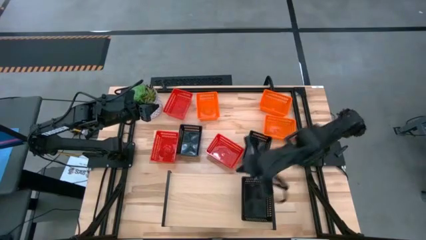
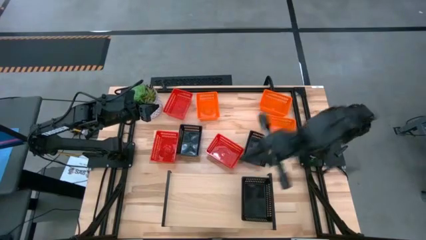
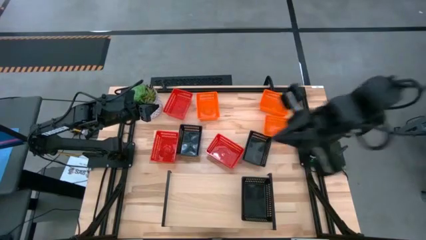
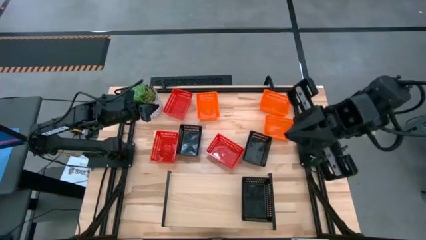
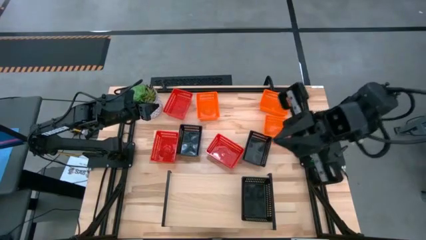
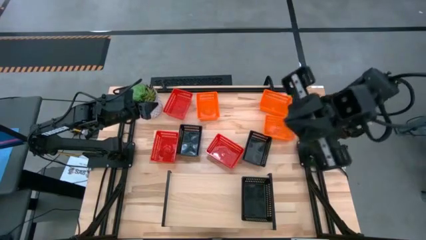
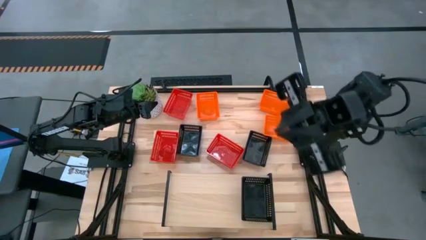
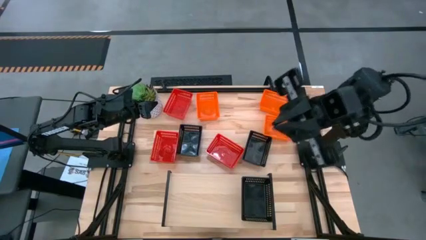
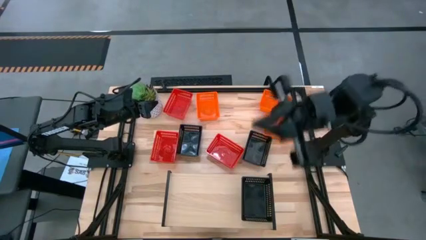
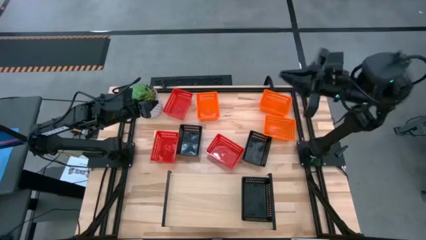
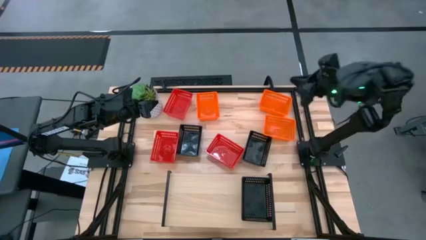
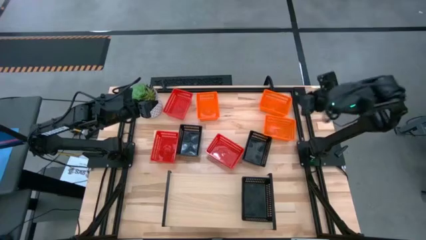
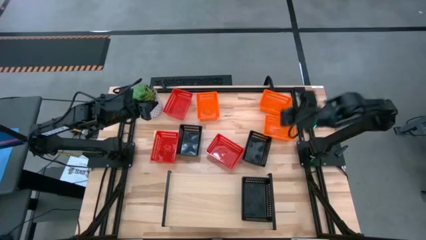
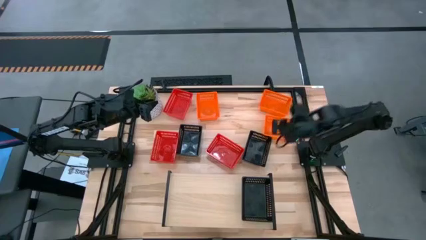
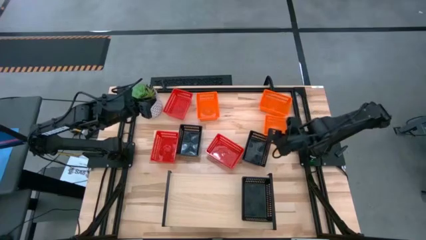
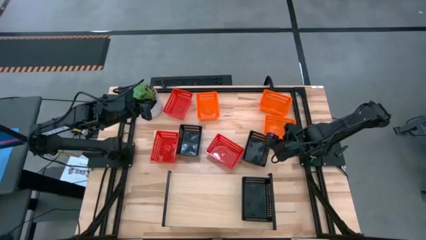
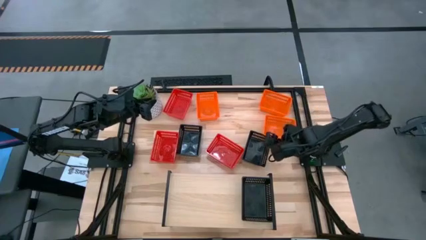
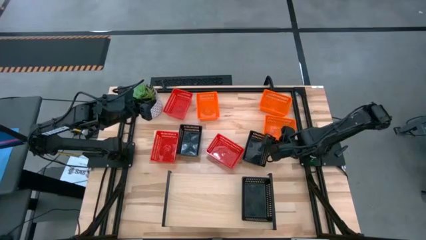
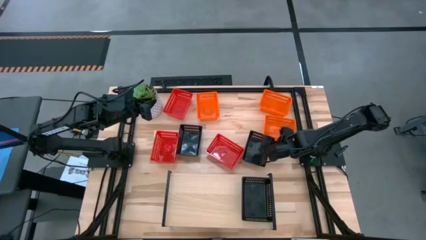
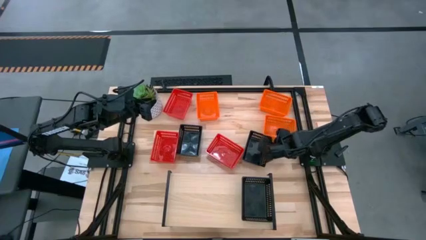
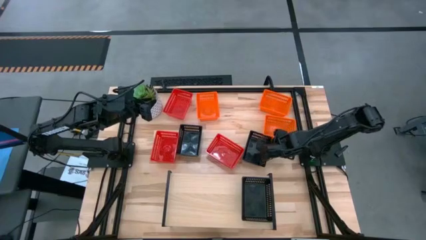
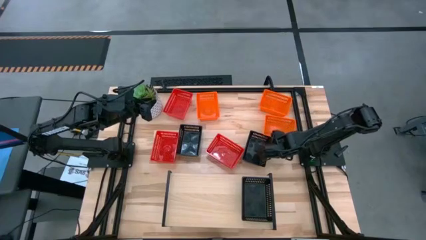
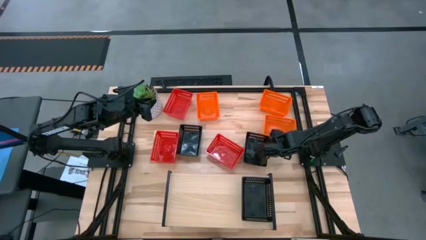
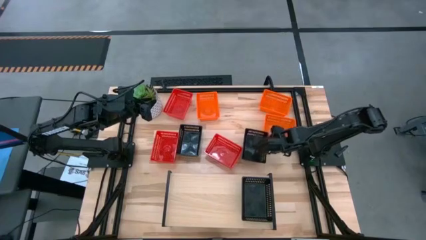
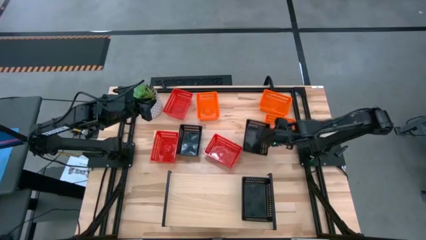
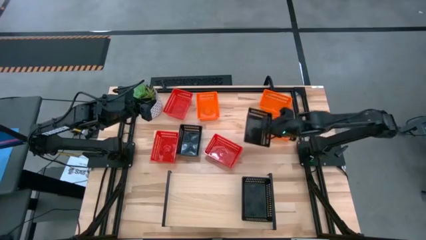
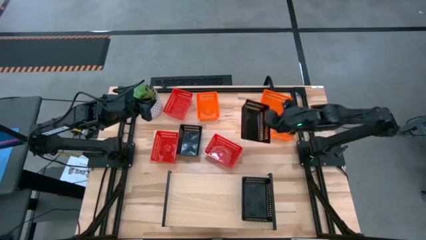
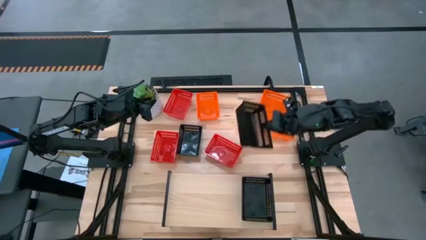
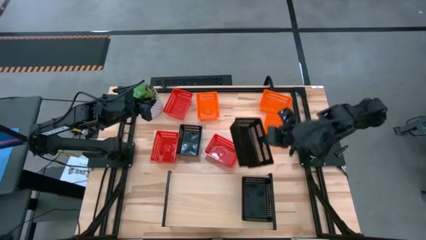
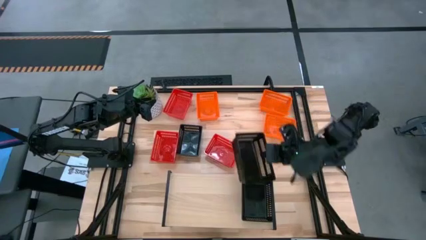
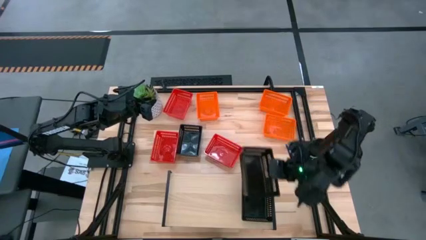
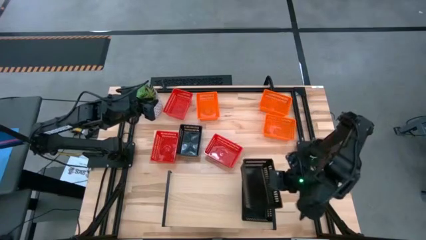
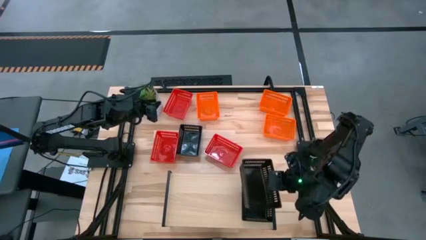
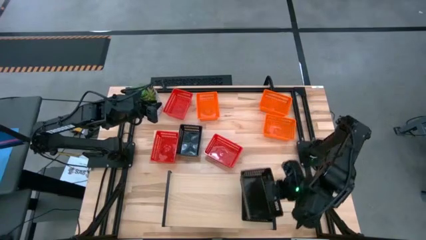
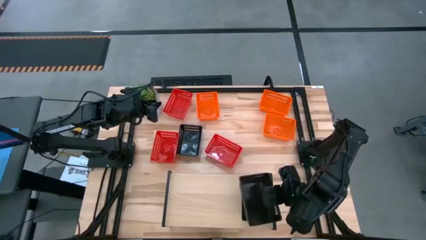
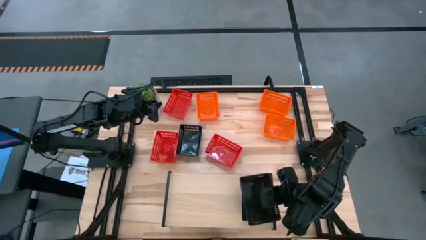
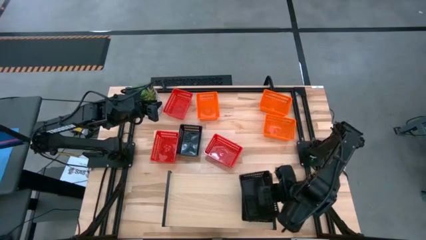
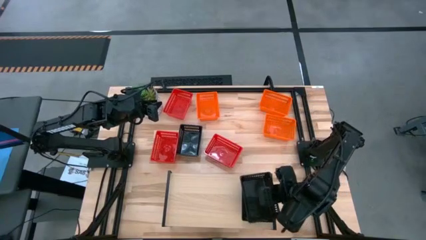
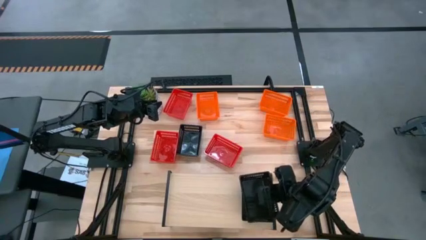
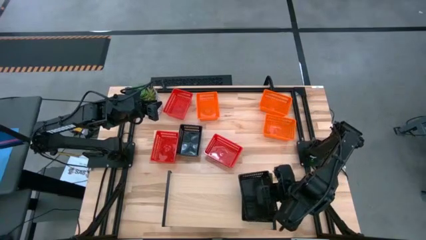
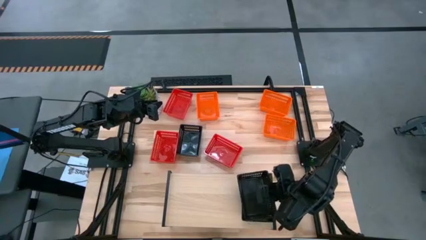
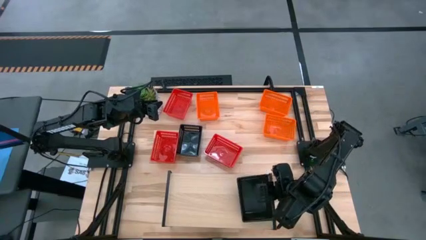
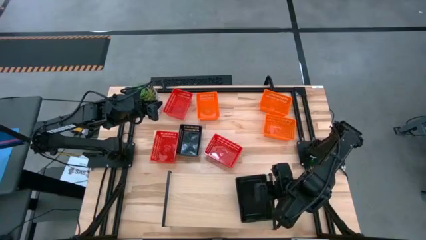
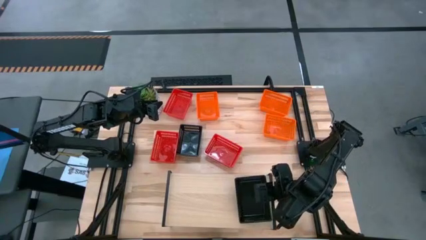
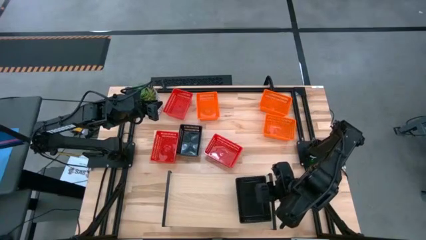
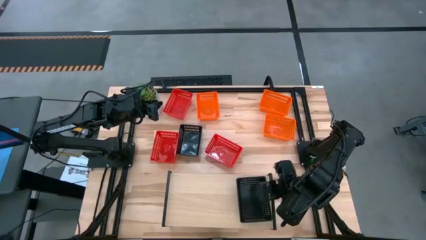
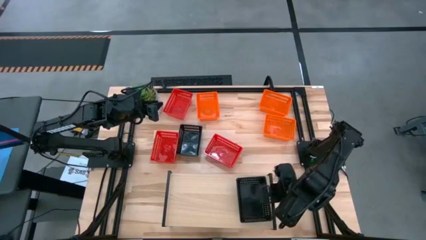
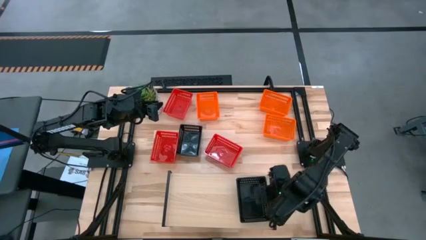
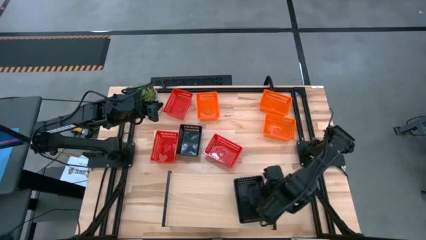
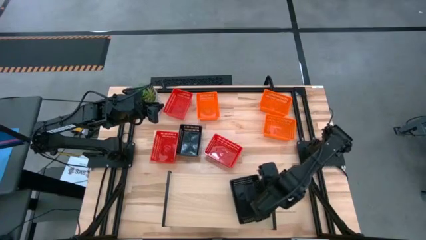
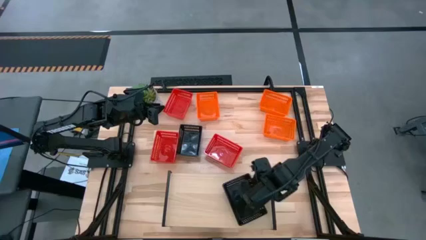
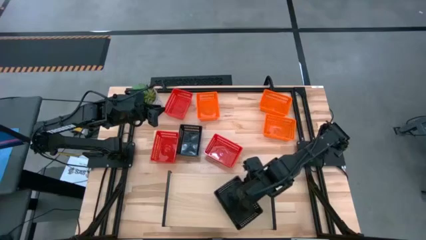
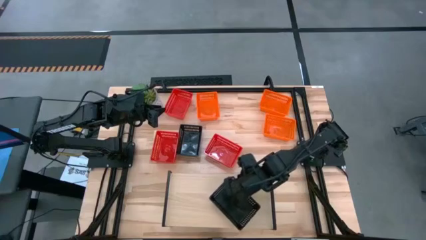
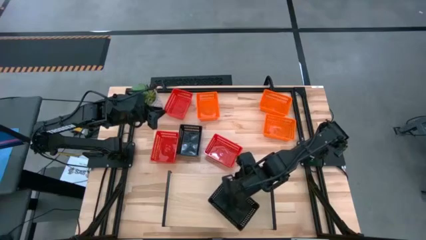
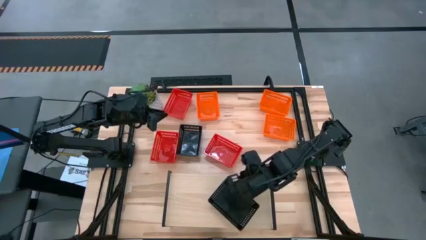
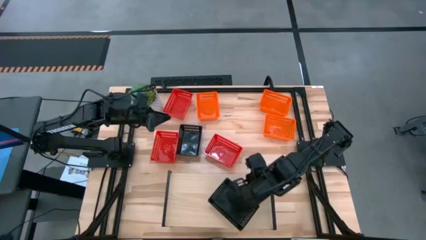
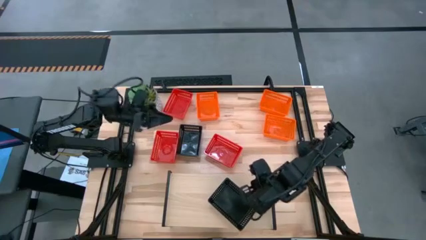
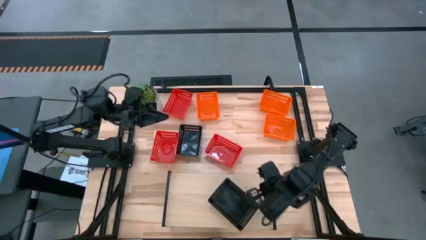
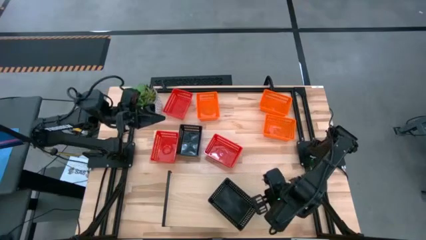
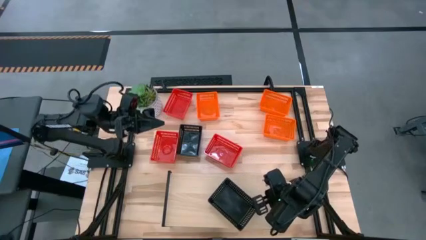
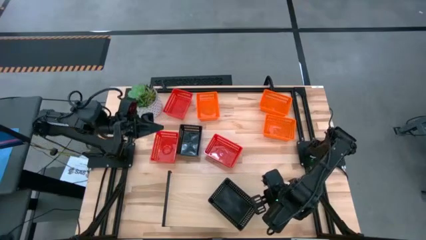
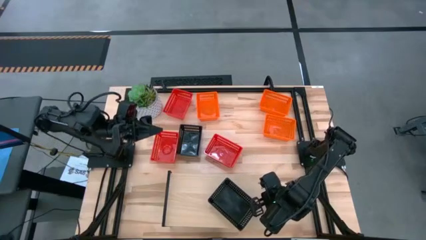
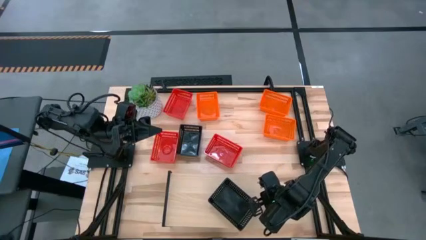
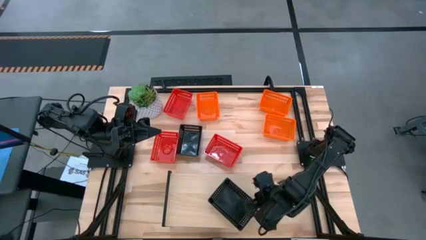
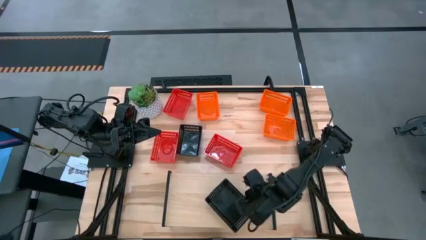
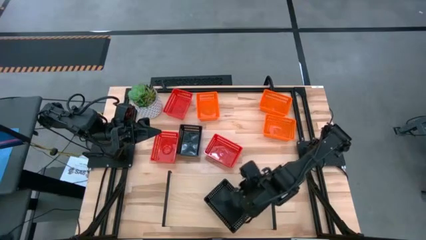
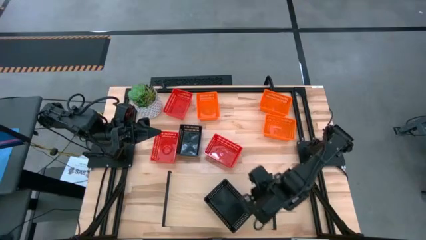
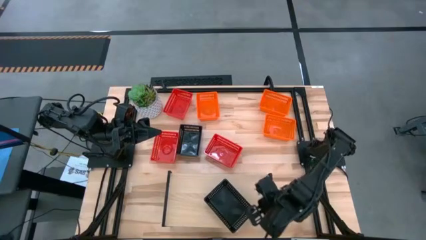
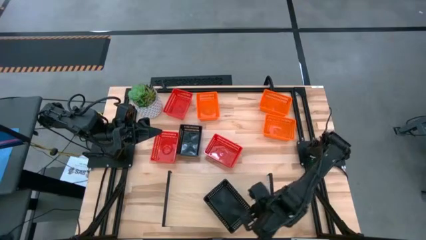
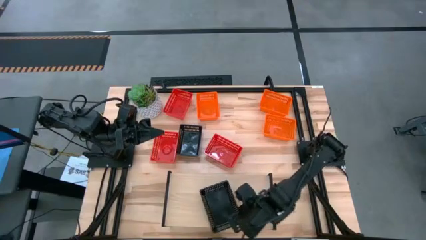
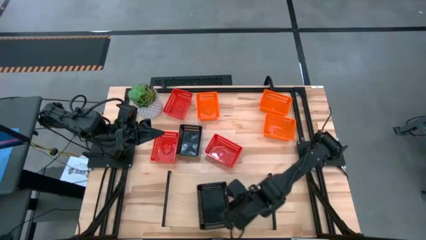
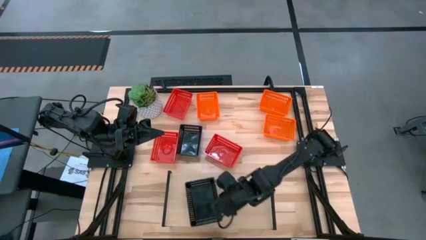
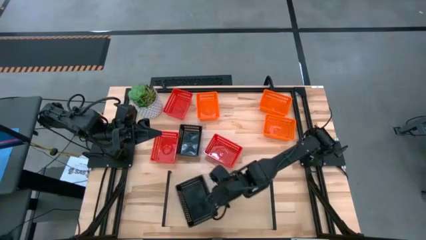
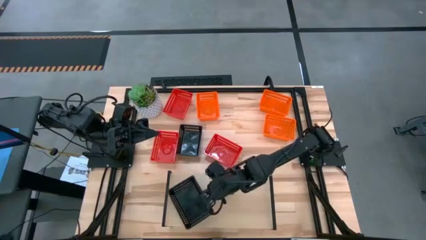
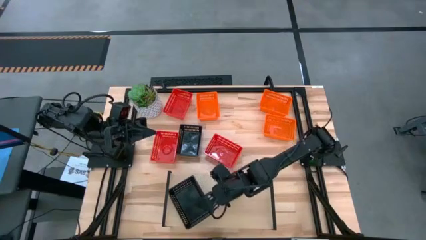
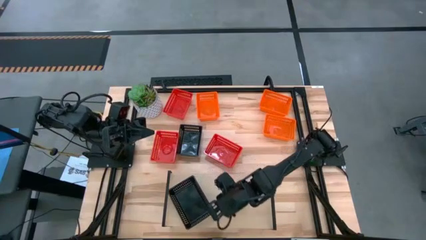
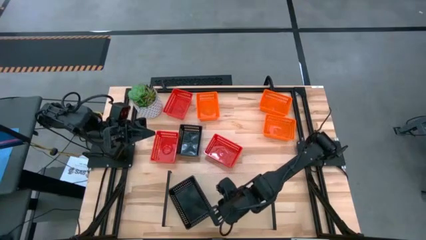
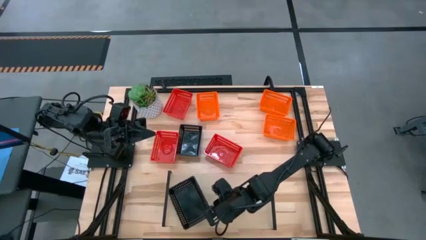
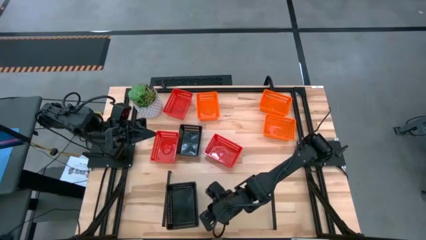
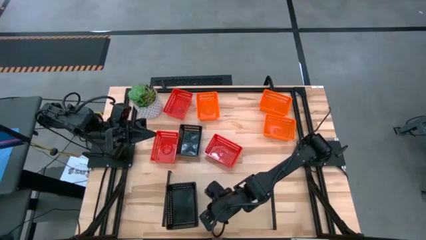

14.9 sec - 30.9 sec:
Task: Stack baskets on shelf by color
Stack the right black bin on the top of the black bin on the shelf
